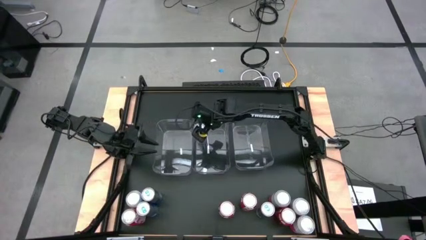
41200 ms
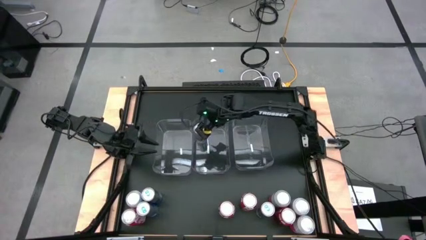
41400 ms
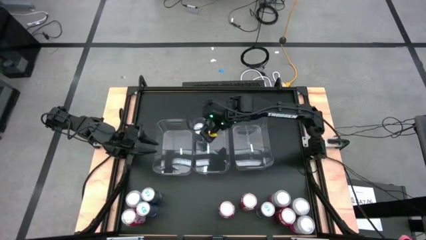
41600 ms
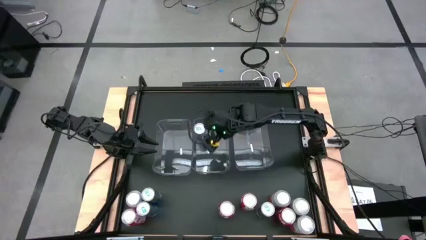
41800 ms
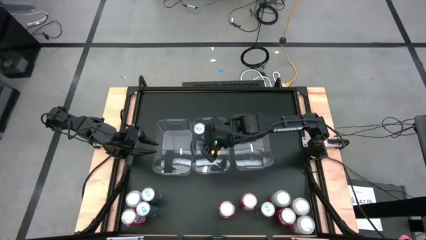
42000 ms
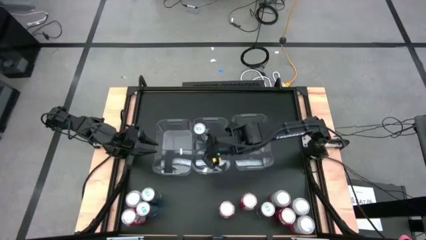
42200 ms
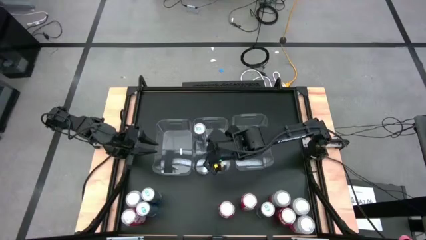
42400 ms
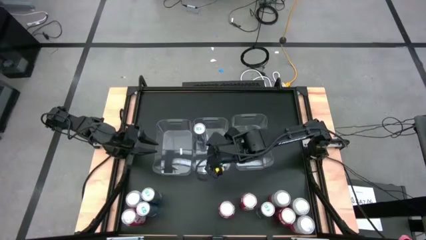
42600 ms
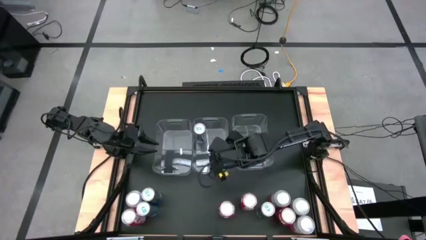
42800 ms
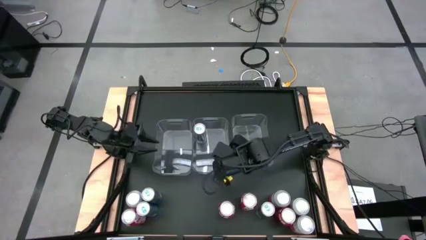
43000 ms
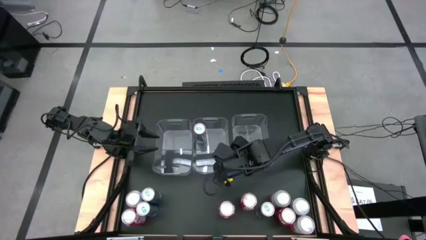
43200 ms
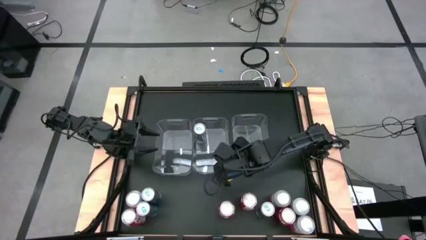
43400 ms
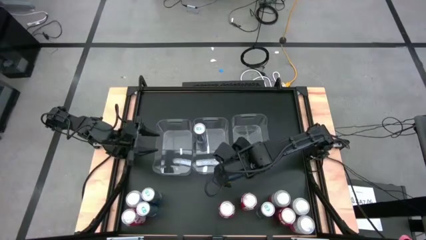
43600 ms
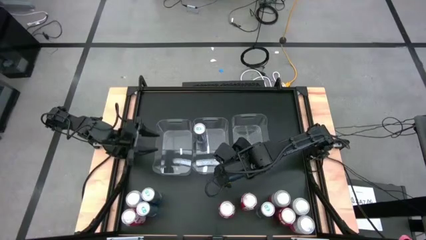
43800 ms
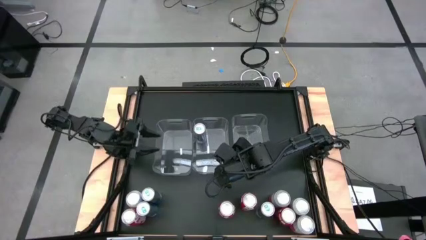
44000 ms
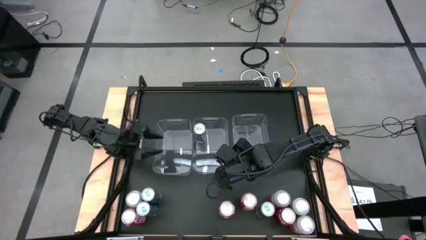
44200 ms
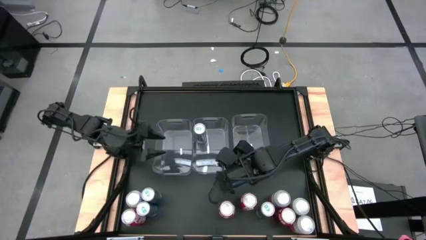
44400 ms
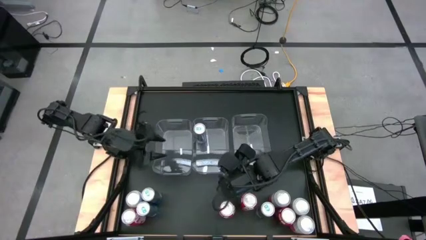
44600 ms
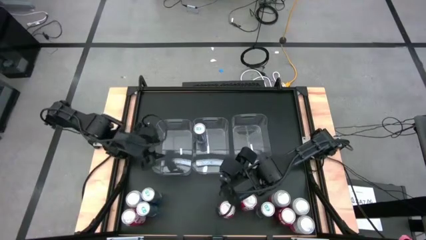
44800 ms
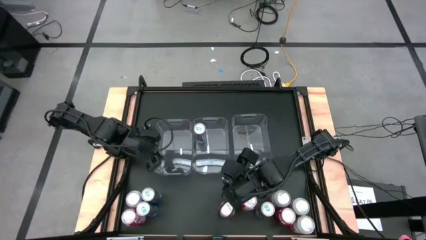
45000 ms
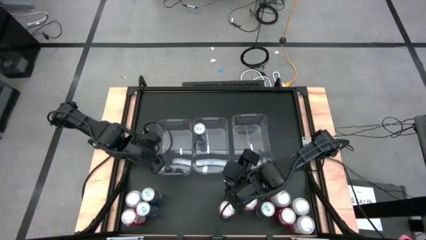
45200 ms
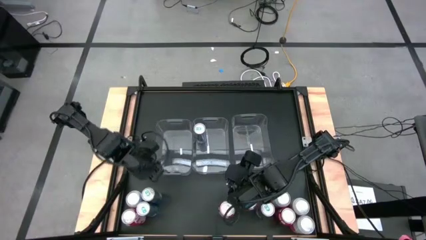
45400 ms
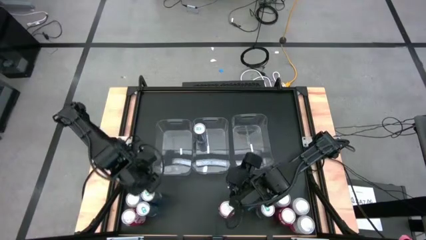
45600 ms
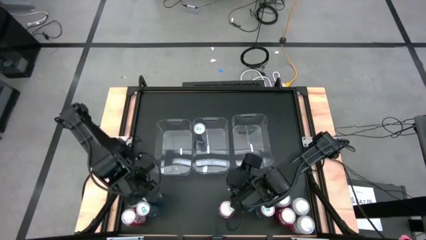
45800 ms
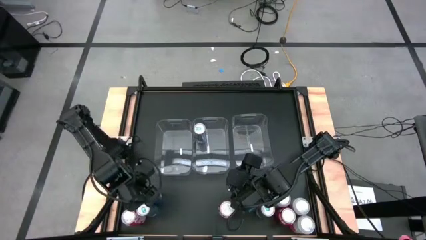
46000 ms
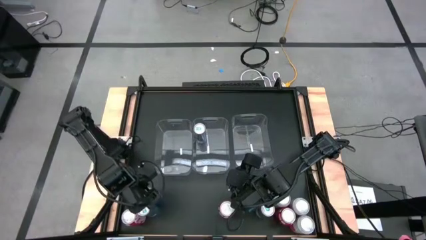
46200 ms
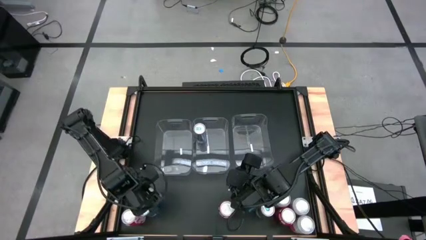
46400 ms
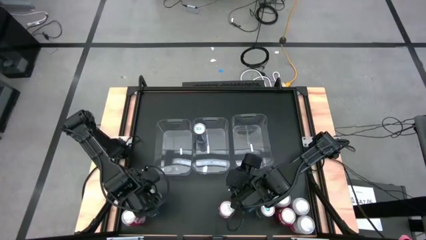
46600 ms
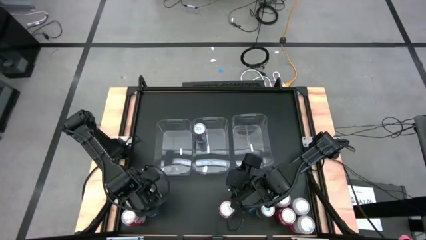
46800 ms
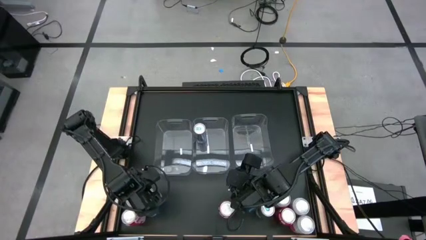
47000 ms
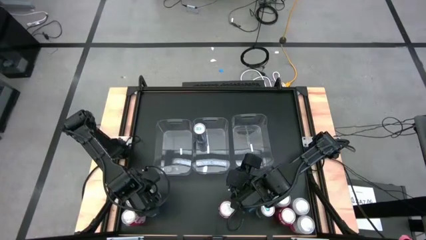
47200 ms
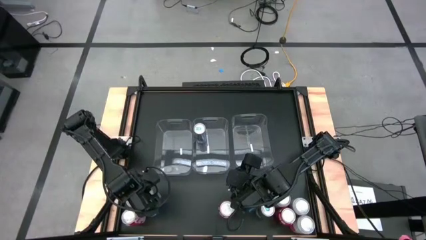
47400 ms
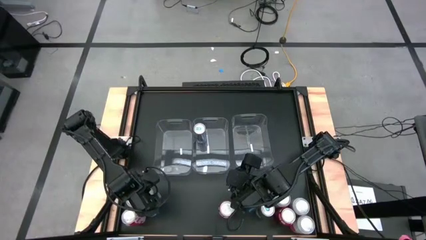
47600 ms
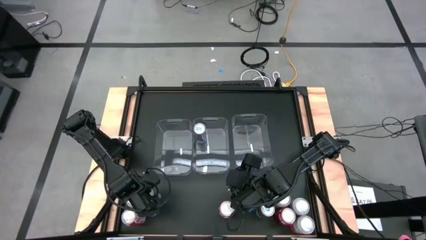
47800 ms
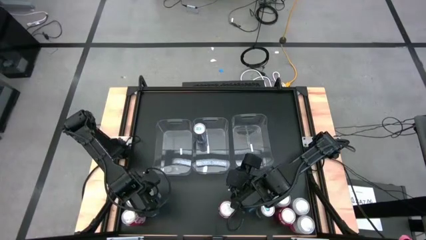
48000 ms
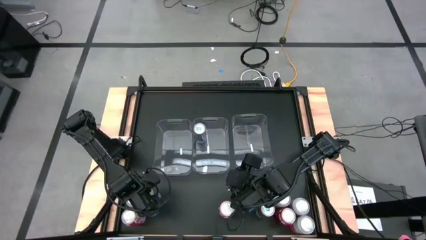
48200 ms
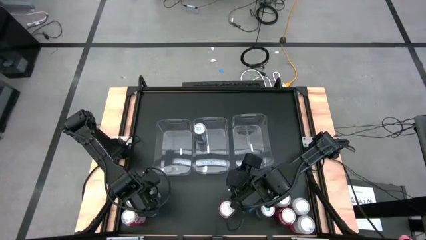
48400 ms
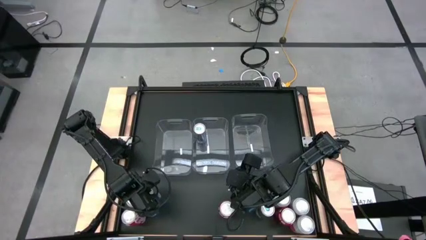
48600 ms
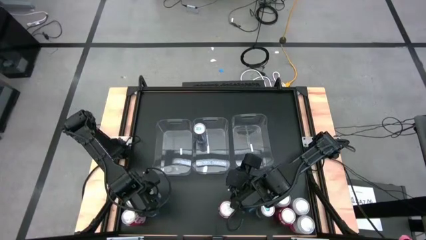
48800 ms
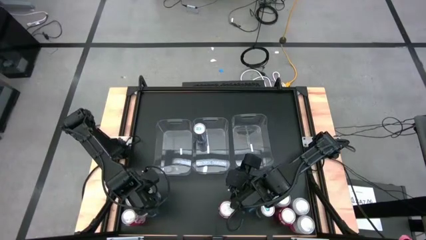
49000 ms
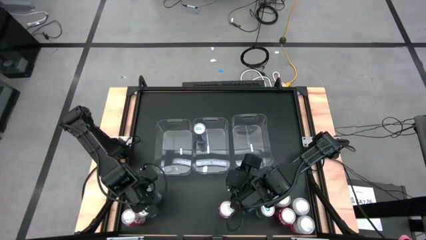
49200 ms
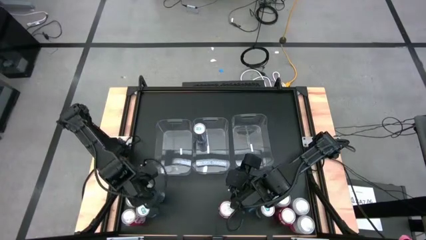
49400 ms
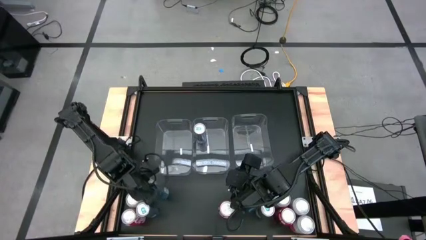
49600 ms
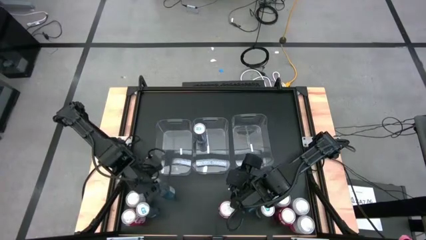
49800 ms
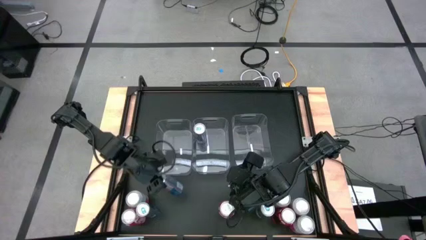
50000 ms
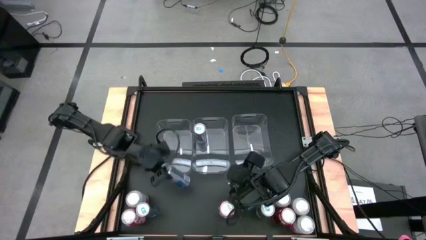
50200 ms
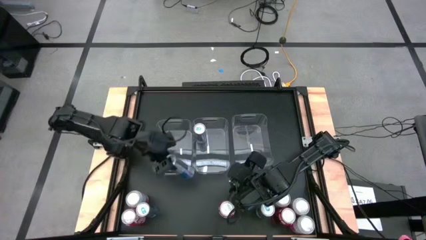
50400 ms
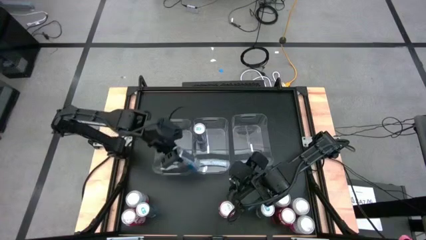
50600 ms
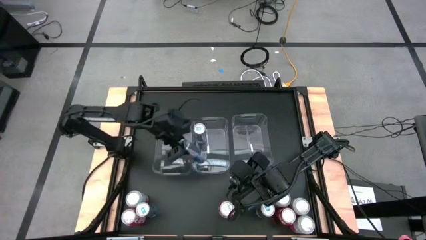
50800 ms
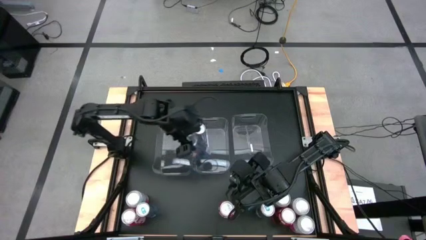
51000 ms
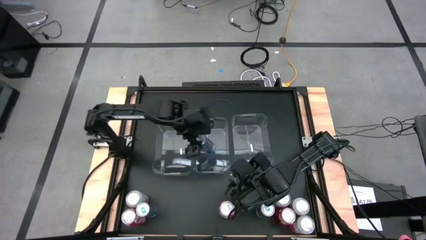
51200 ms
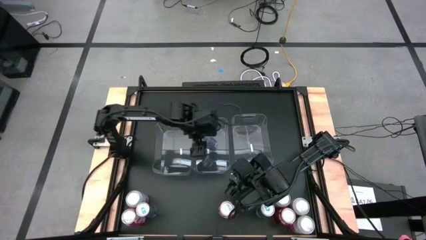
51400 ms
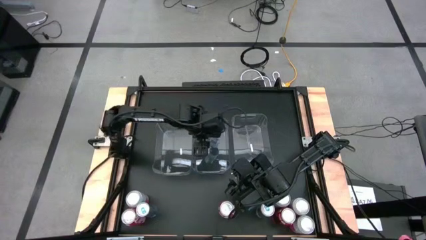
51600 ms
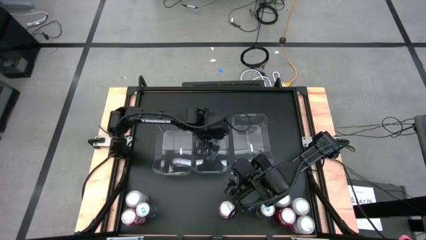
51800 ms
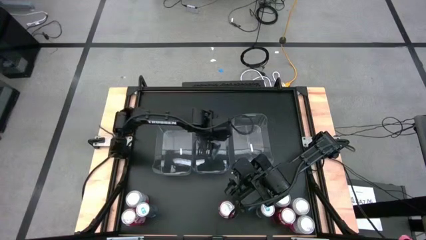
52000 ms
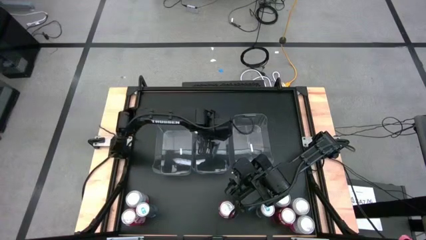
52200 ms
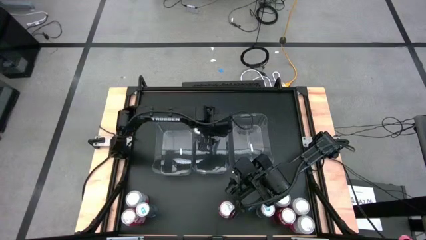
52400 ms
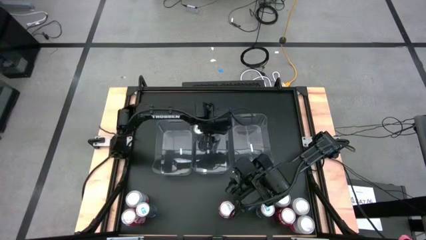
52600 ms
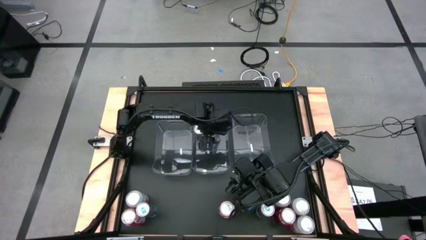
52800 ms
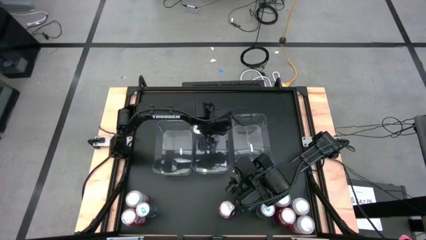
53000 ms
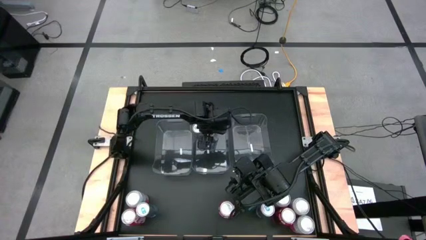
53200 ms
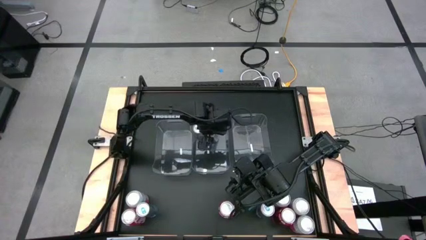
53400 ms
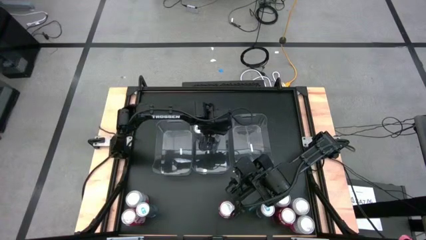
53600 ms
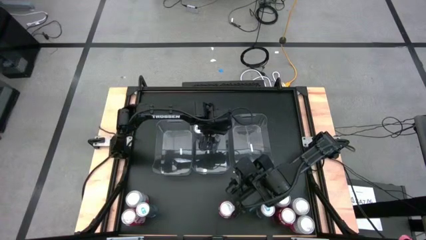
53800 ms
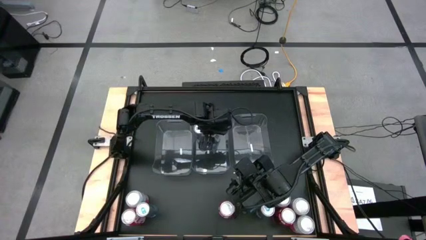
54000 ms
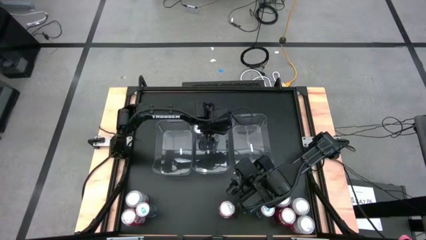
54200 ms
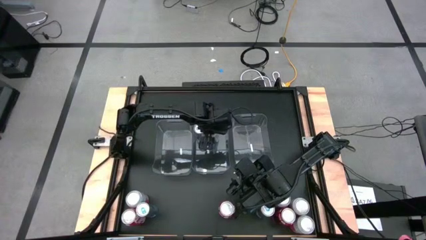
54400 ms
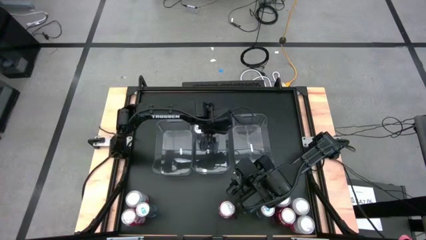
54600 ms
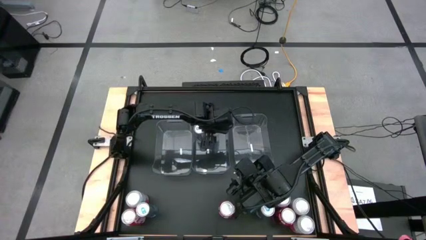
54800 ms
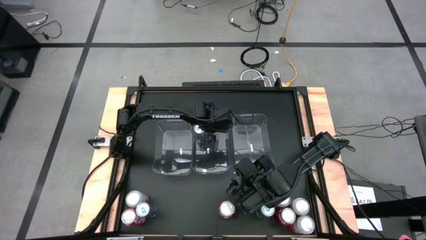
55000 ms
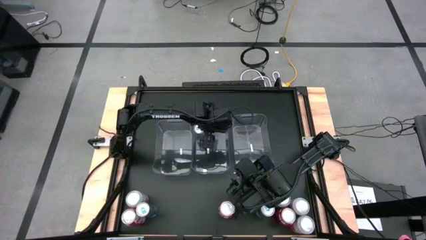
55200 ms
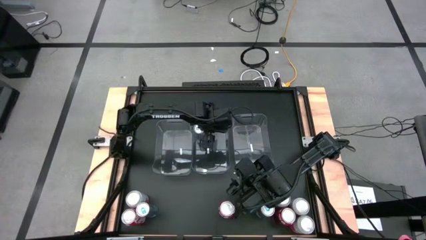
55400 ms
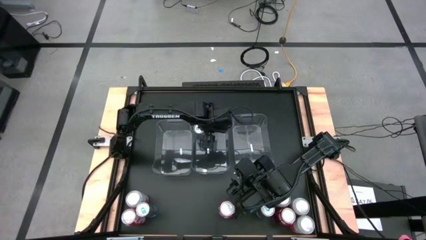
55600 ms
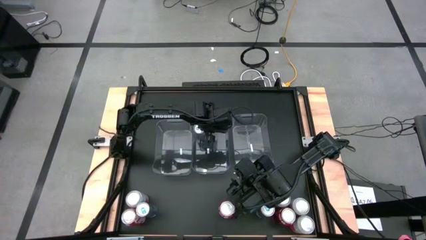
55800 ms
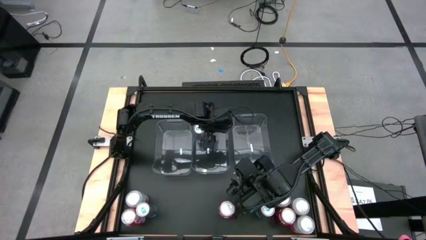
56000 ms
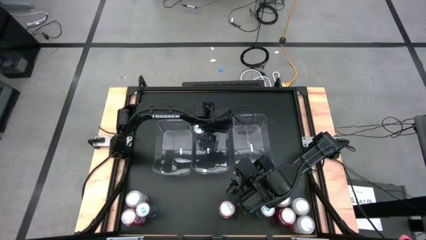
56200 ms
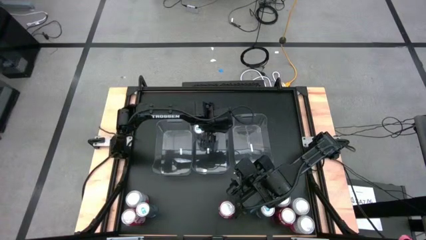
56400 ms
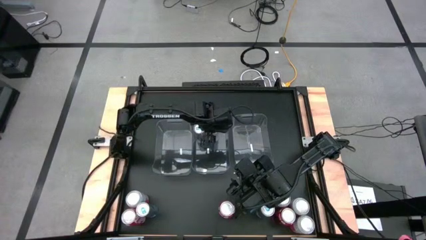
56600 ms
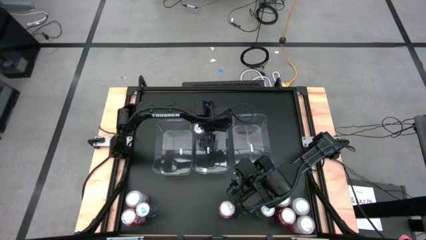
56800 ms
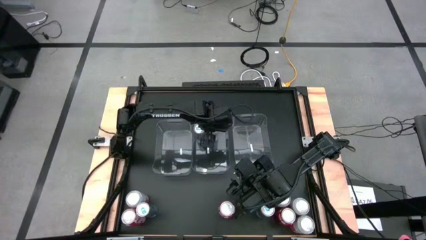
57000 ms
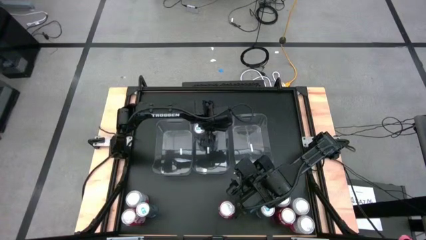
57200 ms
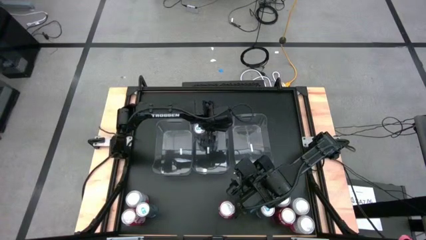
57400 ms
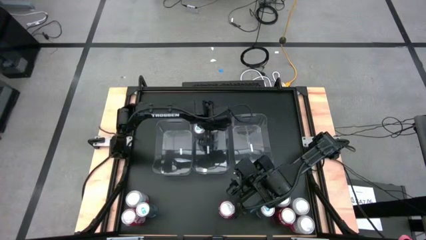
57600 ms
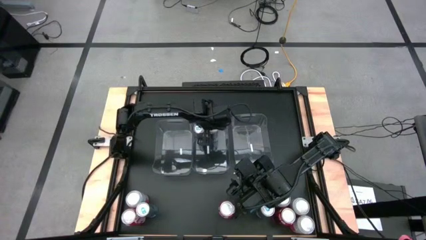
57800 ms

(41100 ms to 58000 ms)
Task: Sort soda cans
Put the blue soda can into the middle transparent bin
